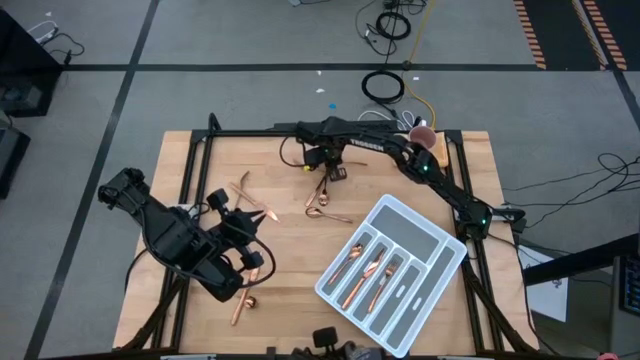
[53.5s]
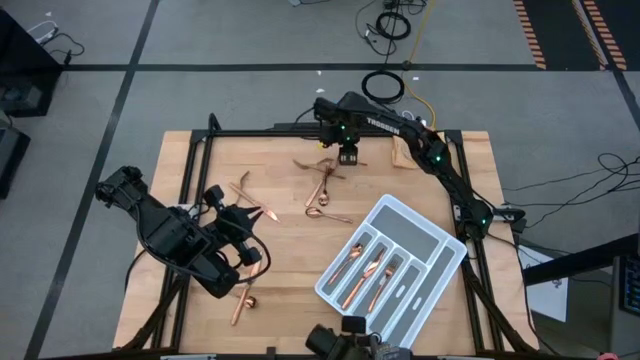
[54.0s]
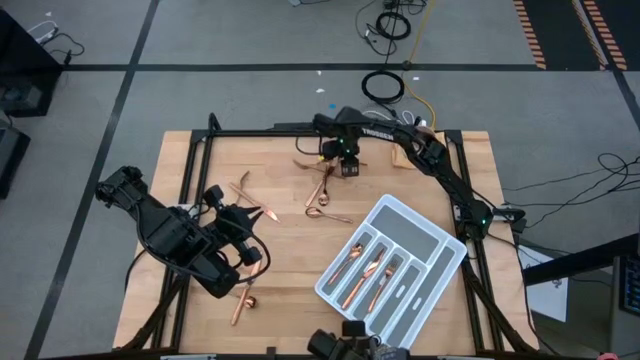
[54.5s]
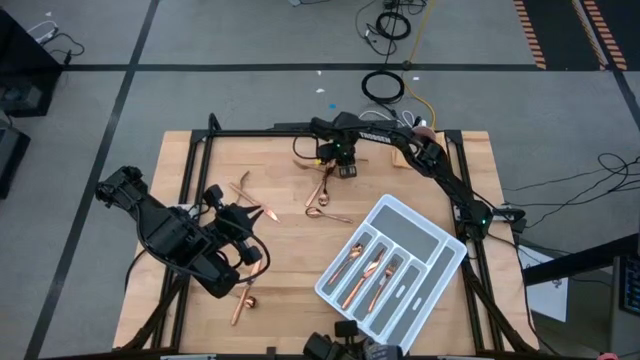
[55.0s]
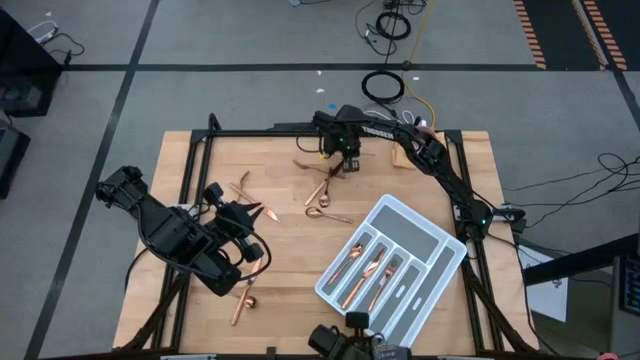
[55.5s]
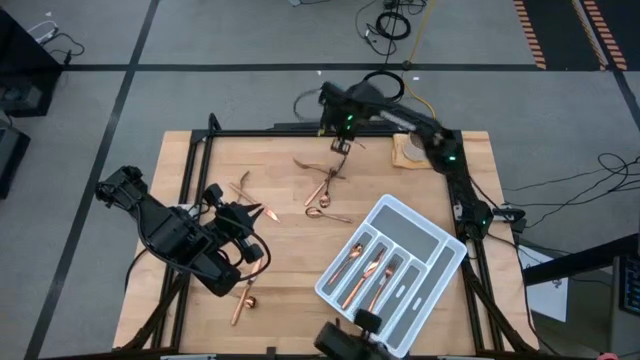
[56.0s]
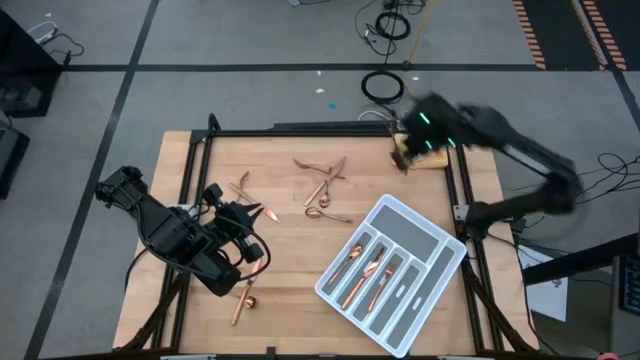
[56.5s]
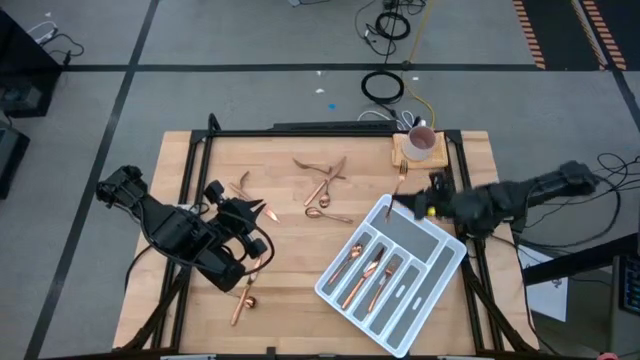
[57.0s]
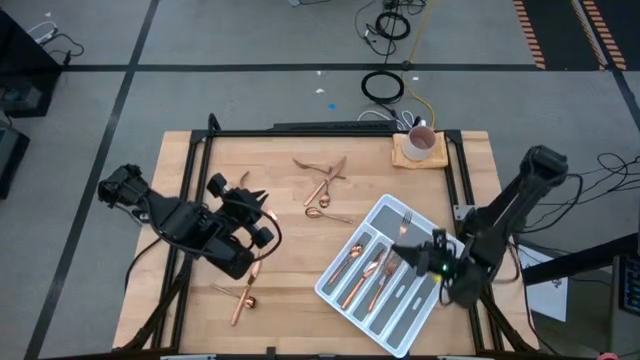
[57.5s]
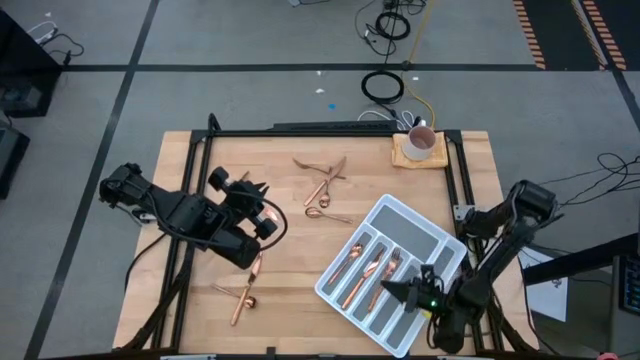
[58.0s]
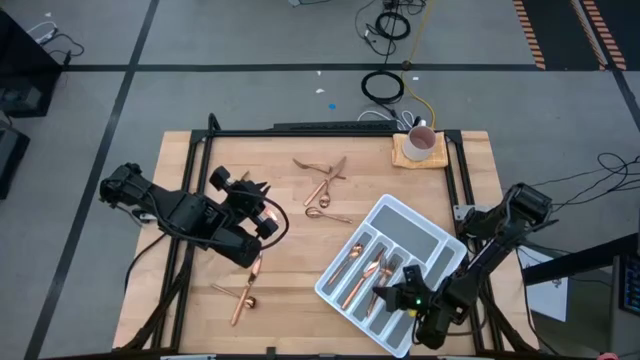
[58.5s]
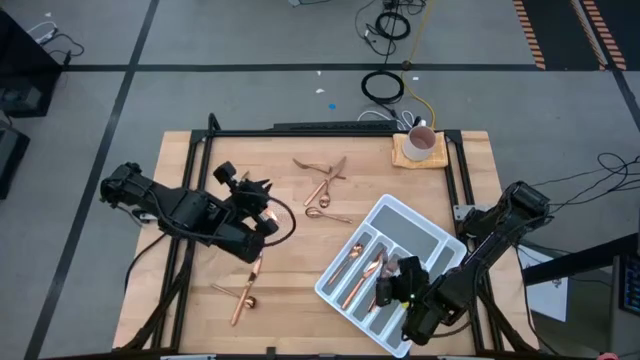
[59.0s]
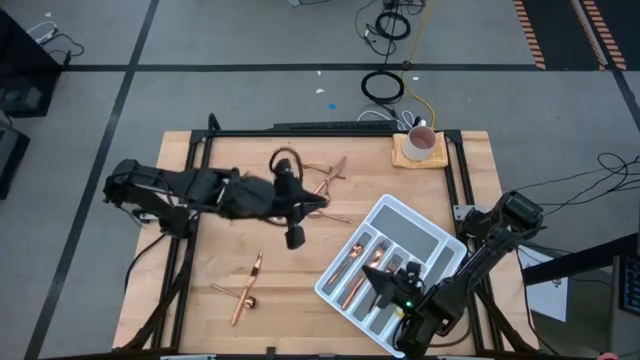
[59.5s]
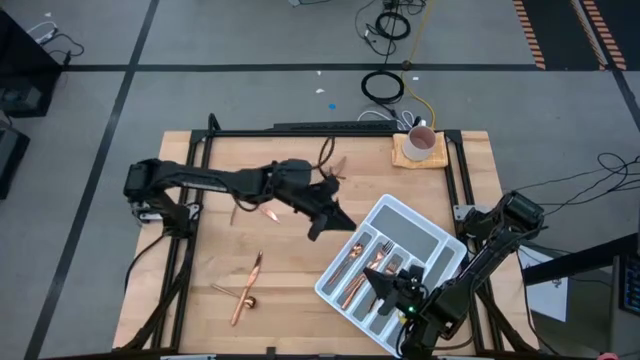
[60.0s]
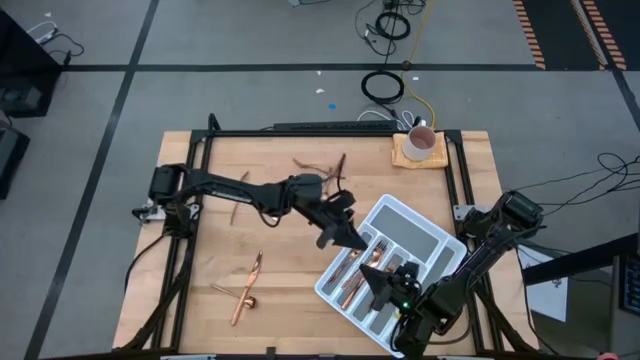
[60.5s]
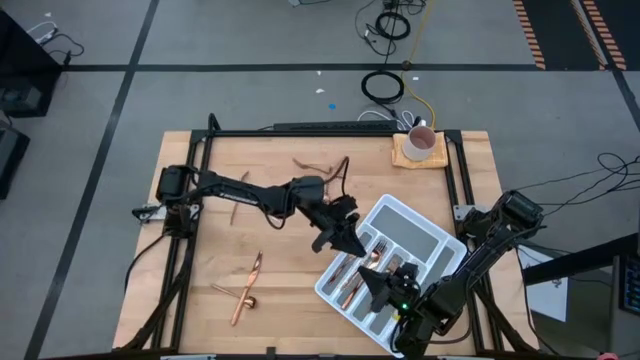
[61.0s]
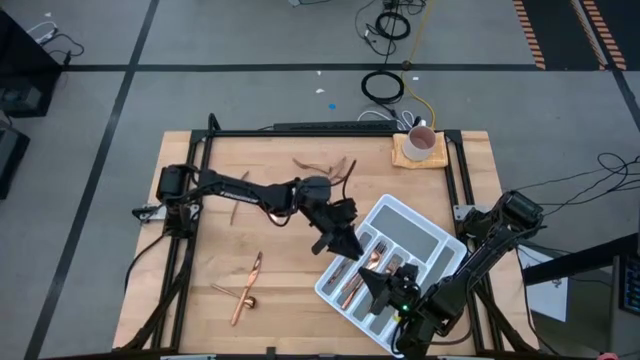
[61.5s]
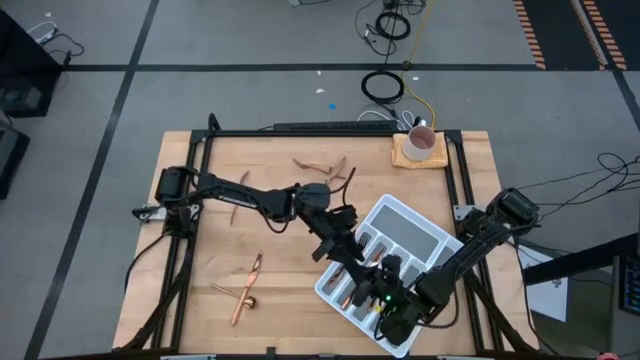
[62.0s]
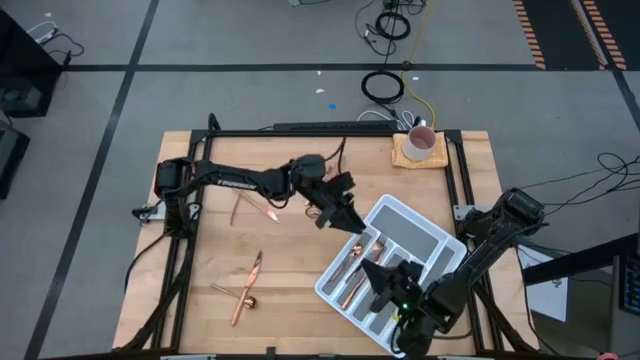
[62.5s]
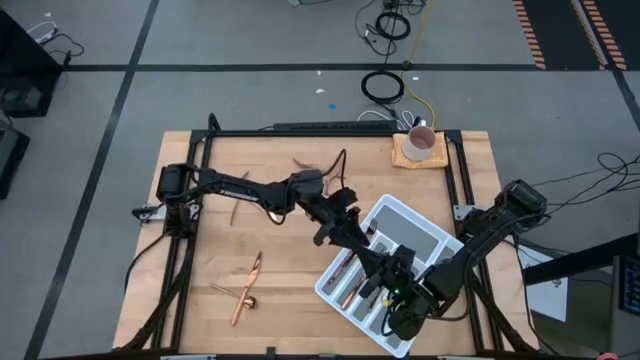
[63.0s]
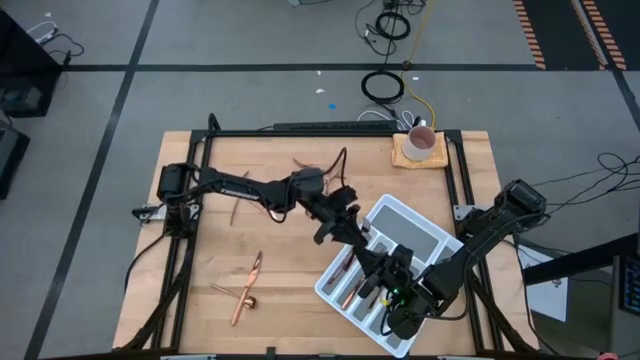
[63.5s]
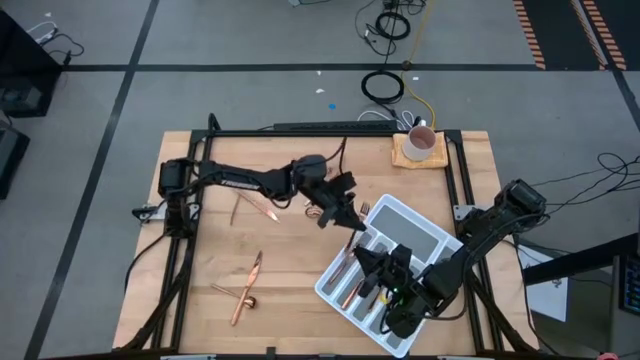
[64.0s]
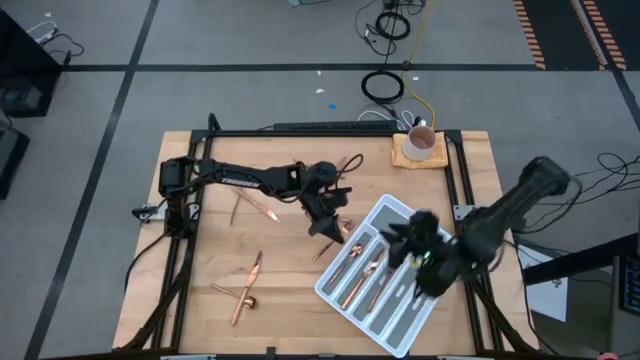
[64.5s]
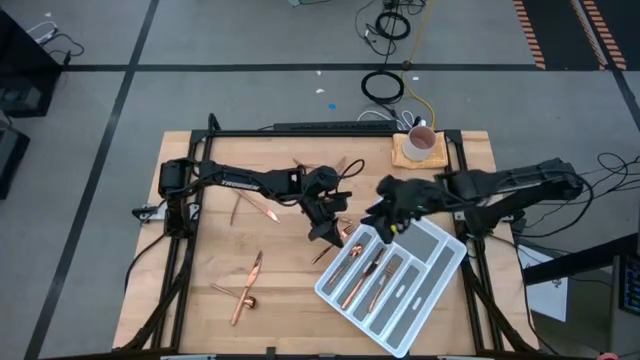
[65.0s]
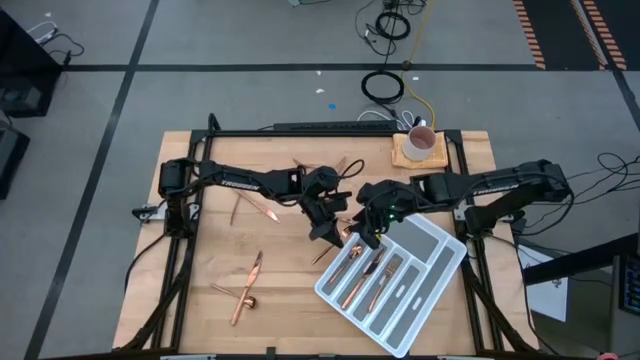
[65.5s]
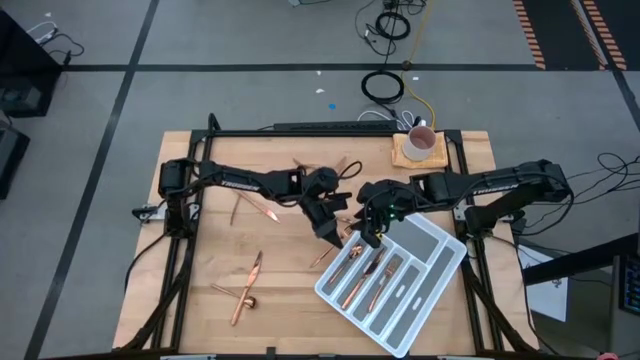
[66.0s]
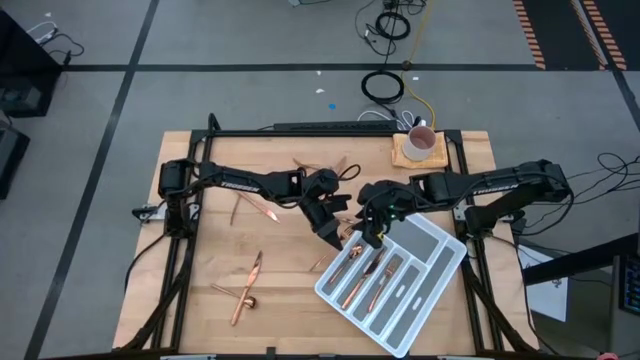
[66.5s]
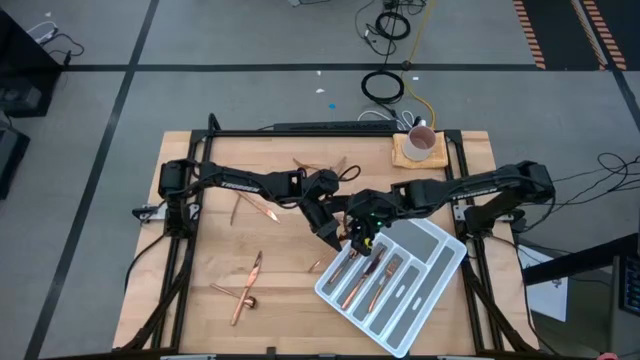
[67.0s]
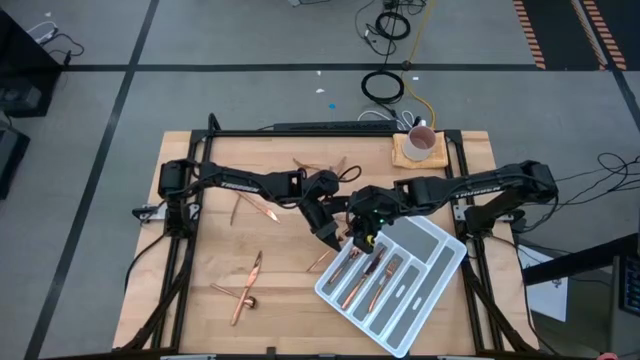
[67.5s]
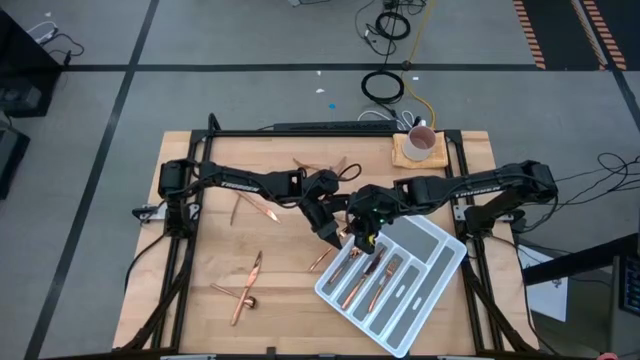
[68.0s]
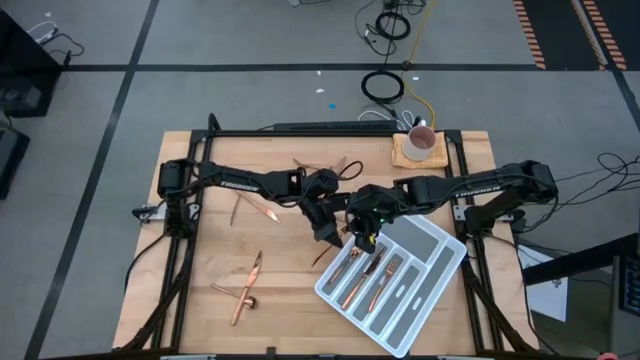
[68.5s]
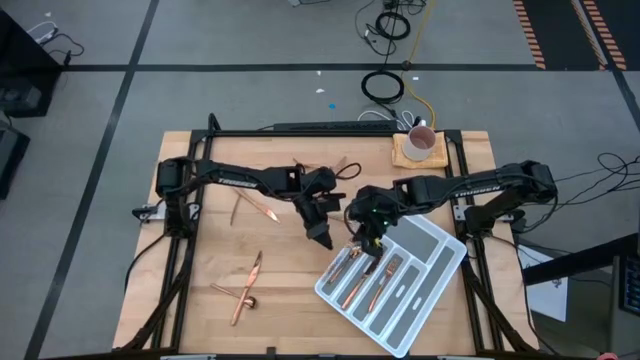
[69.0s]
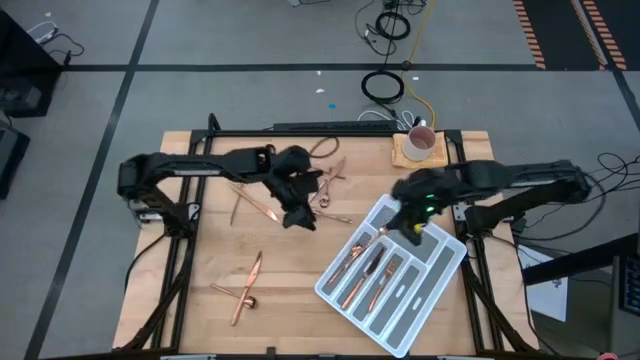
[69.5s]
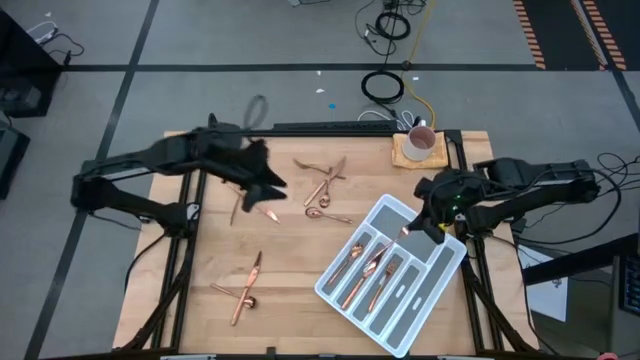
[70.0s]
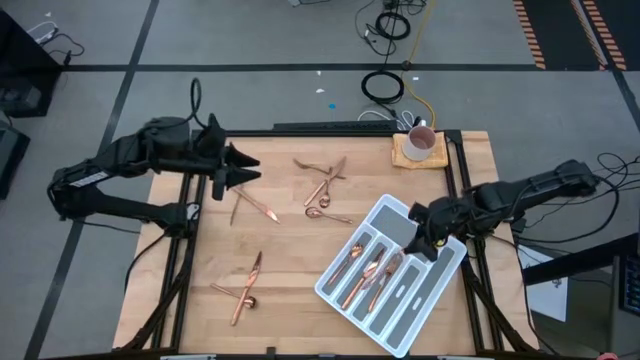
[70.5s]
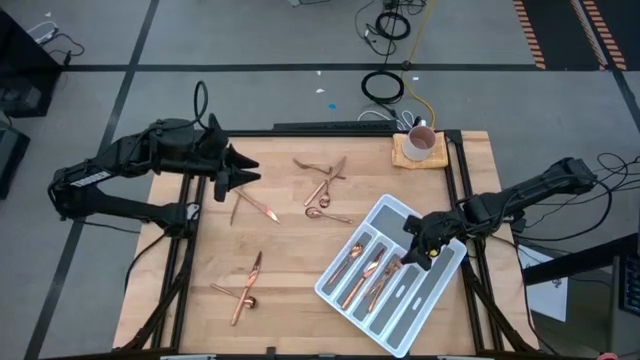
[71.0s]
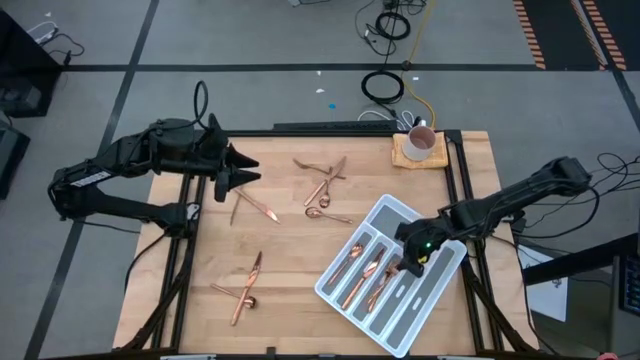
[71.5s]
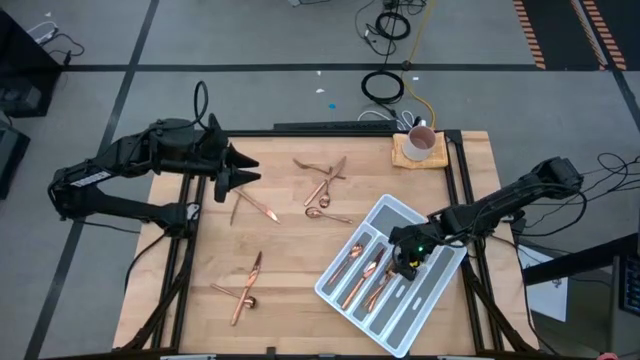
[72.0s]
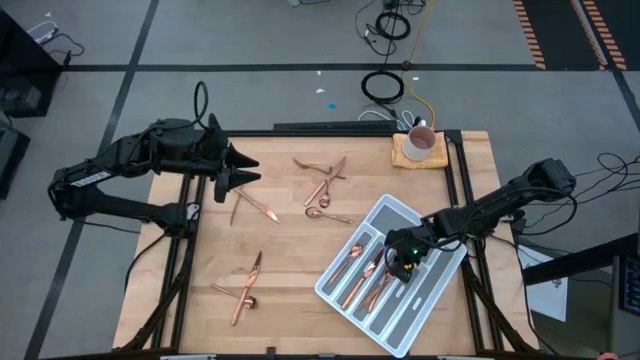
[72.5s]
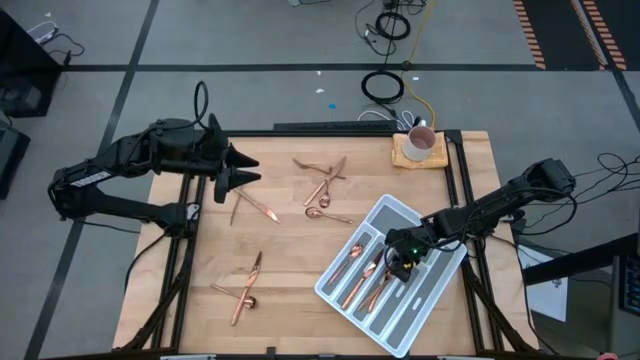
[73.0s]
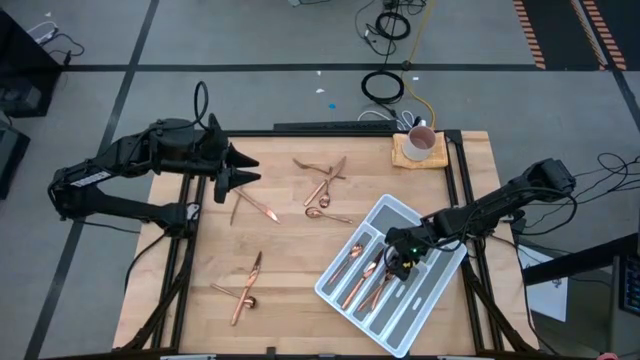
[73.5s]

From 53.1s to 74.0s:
Task: Sort silverware
Put the gold fork into the cutlery tray with the other gold fork

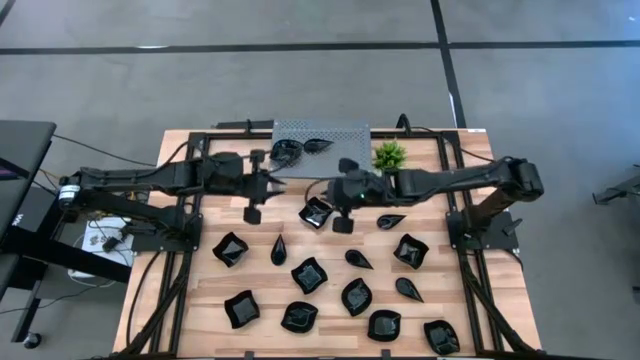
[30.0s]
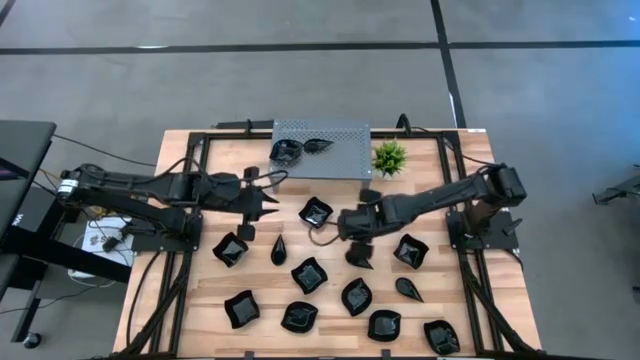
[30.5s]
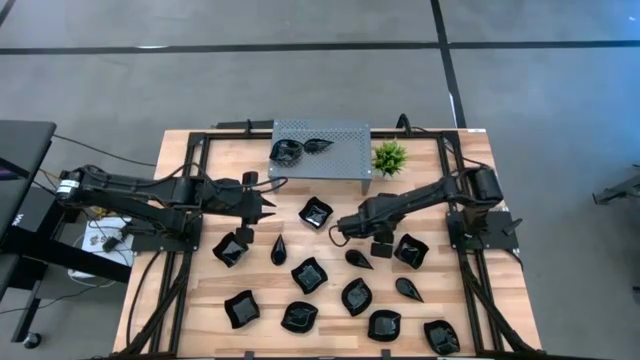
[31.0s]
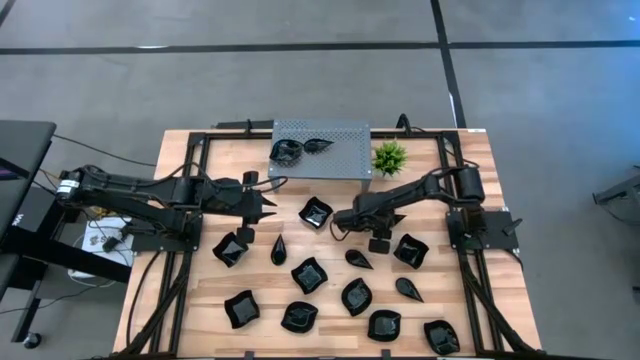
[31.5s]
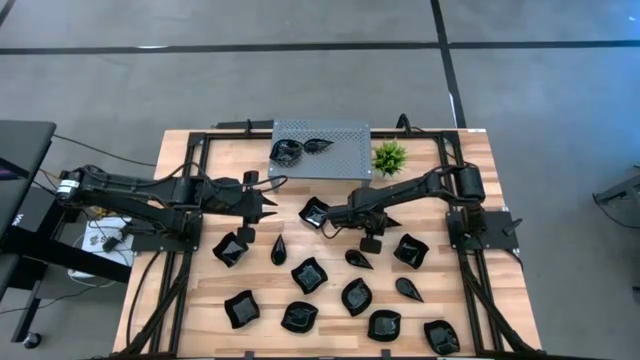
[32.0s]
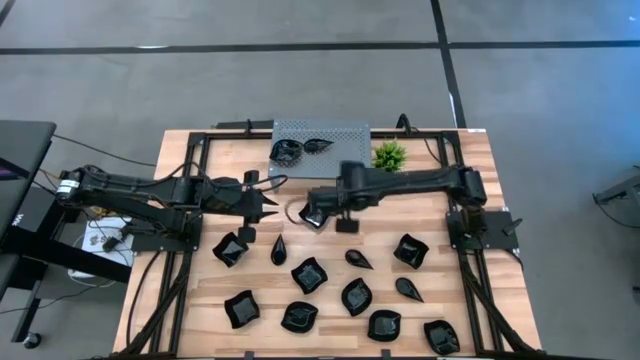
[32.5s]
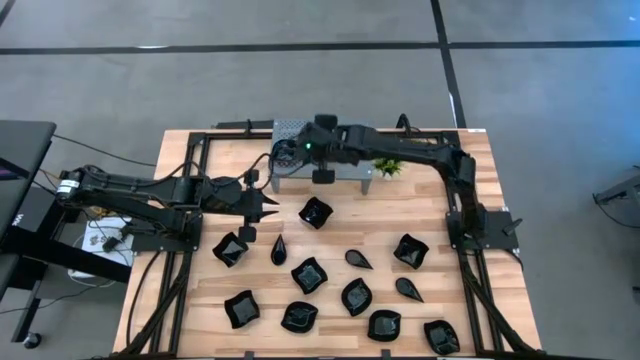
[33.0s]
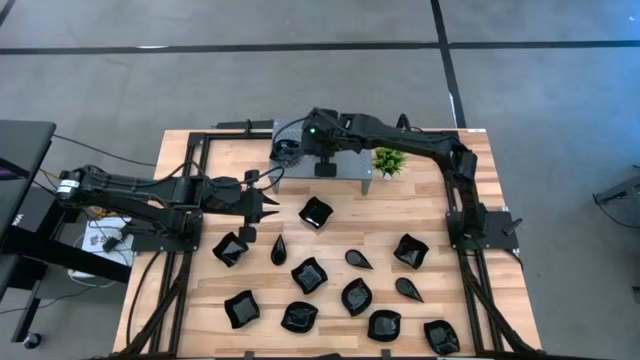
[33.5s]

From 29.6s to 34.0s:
Task: Pick & Place Mini shaped plates
Stack the drop-shaped plate on top of the drop-shaped plate on the shelf
